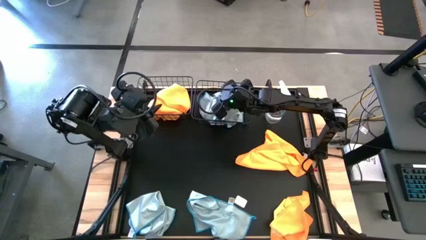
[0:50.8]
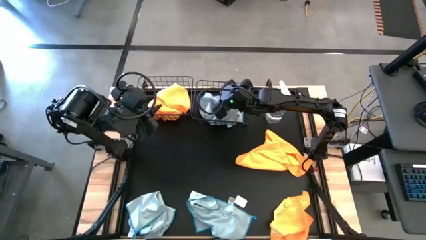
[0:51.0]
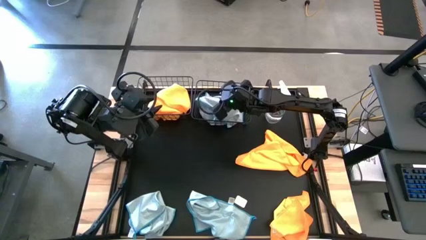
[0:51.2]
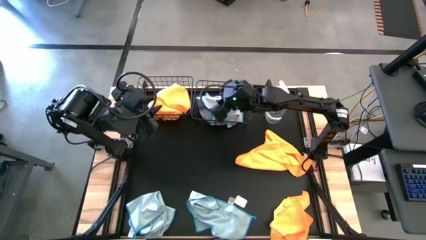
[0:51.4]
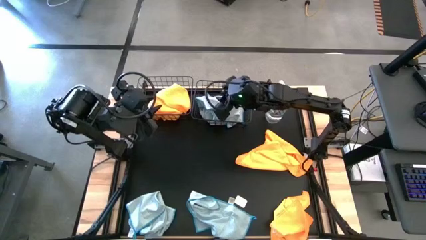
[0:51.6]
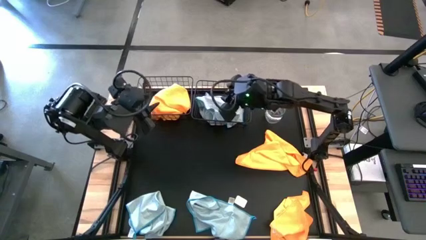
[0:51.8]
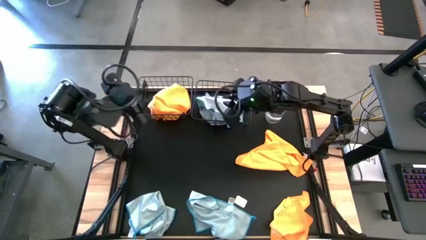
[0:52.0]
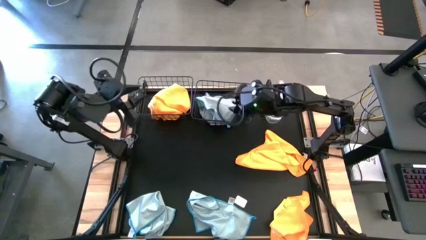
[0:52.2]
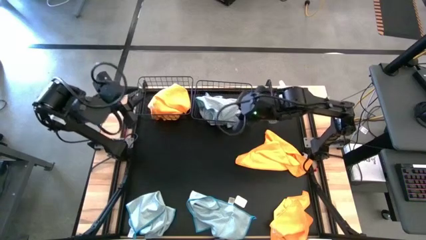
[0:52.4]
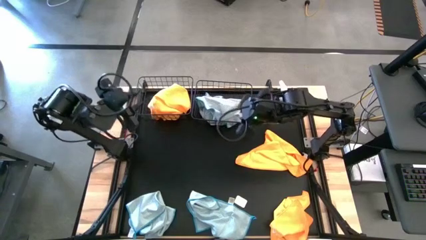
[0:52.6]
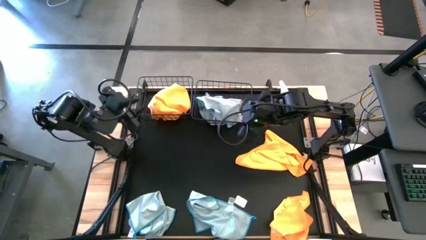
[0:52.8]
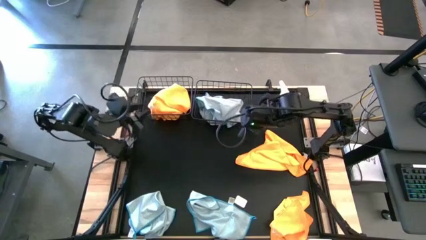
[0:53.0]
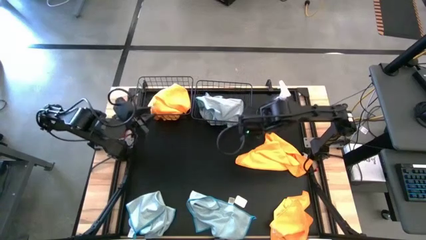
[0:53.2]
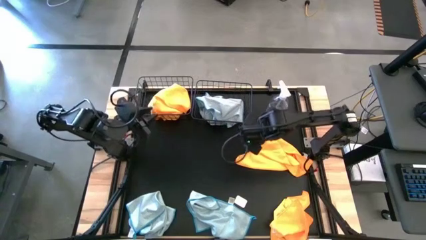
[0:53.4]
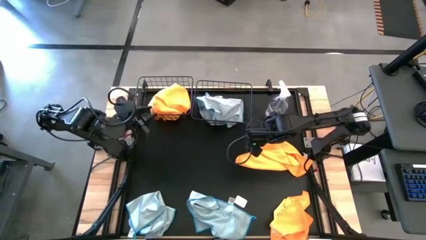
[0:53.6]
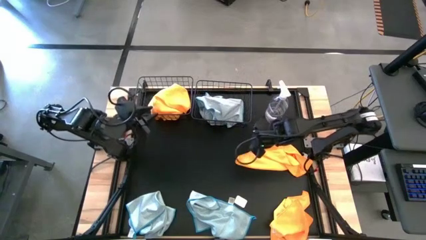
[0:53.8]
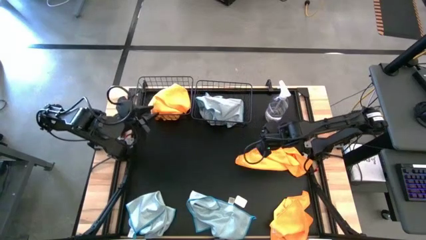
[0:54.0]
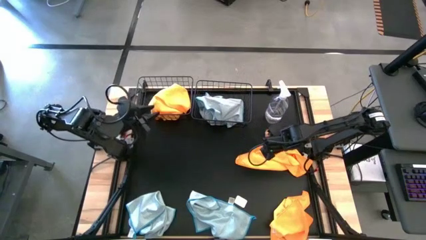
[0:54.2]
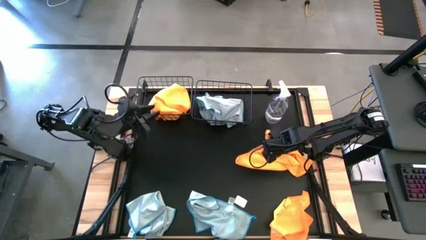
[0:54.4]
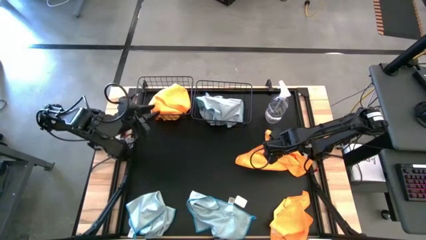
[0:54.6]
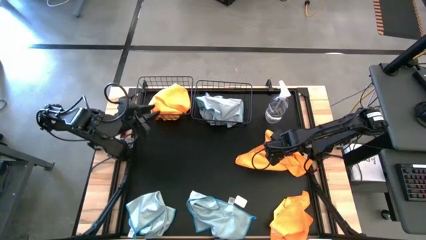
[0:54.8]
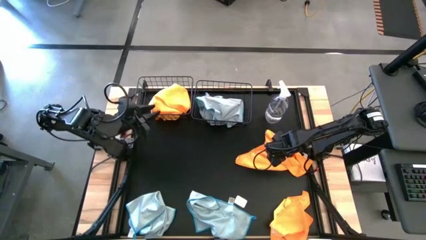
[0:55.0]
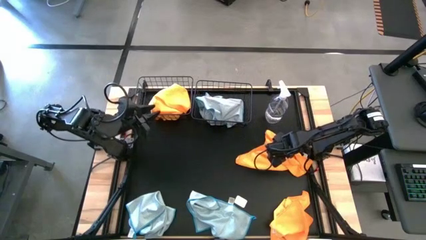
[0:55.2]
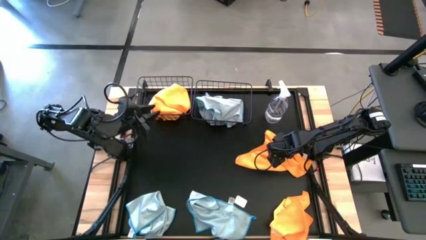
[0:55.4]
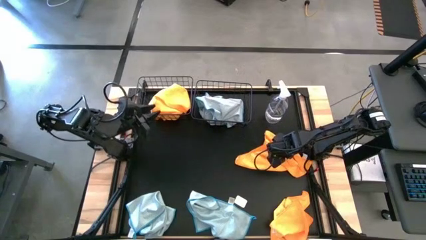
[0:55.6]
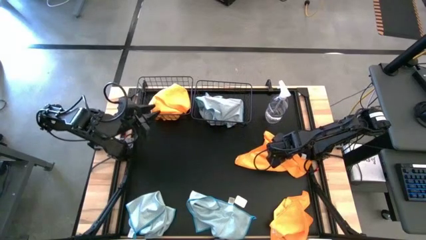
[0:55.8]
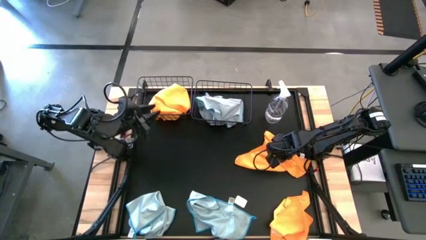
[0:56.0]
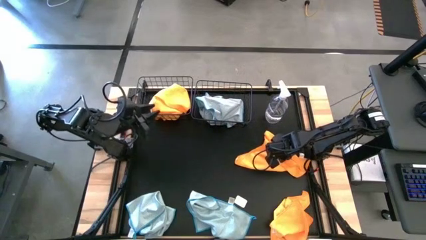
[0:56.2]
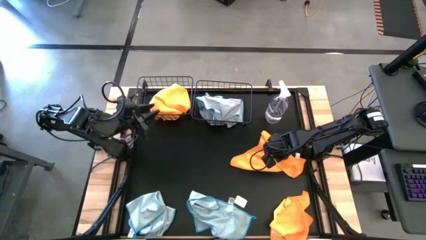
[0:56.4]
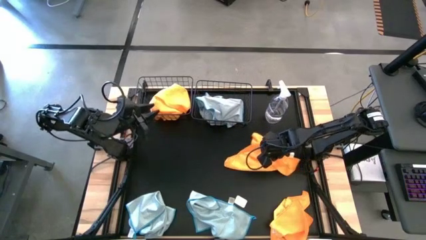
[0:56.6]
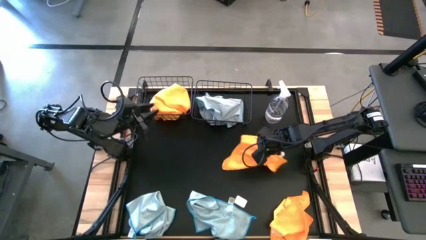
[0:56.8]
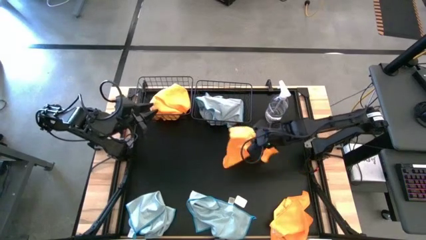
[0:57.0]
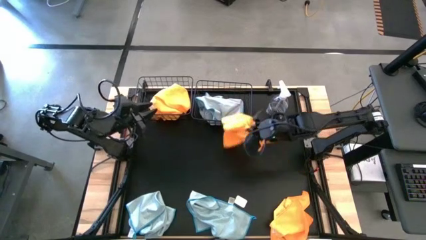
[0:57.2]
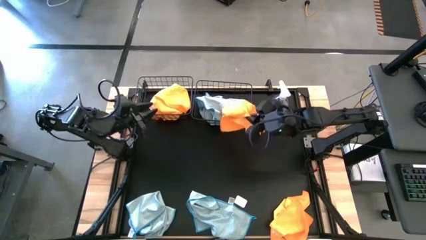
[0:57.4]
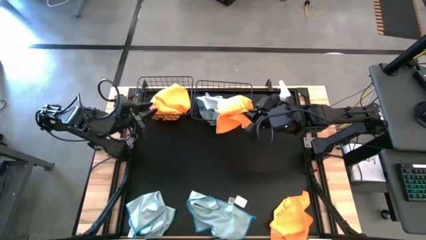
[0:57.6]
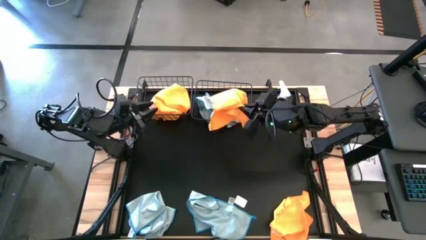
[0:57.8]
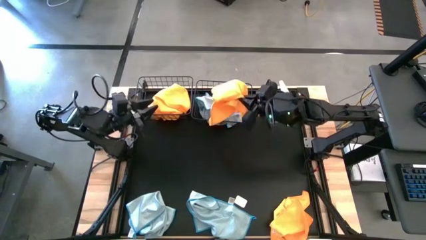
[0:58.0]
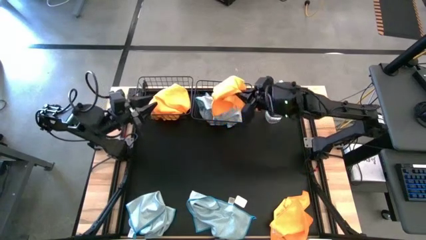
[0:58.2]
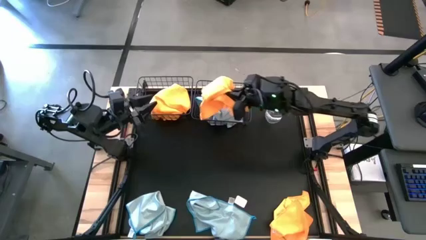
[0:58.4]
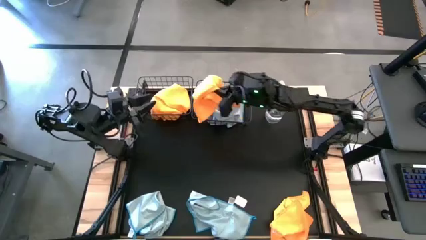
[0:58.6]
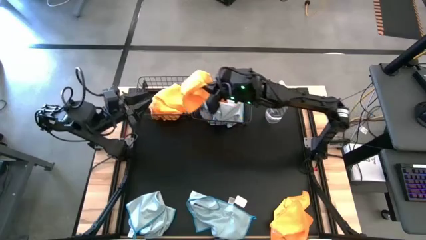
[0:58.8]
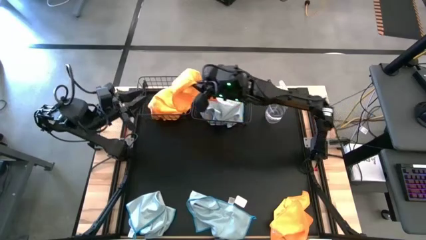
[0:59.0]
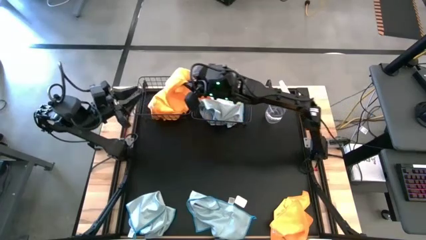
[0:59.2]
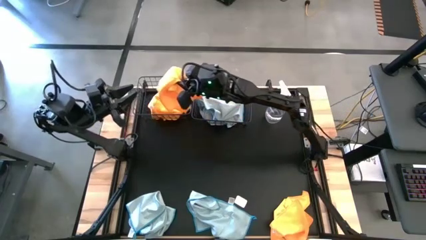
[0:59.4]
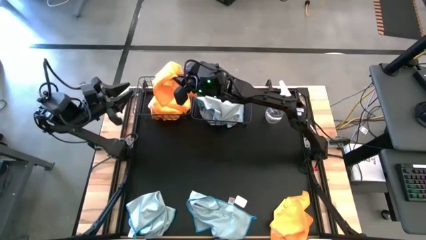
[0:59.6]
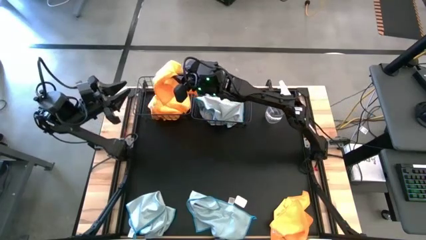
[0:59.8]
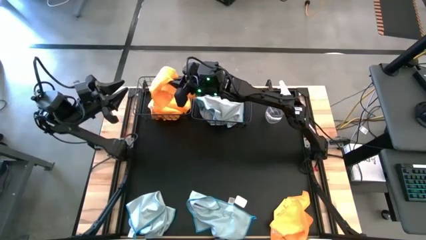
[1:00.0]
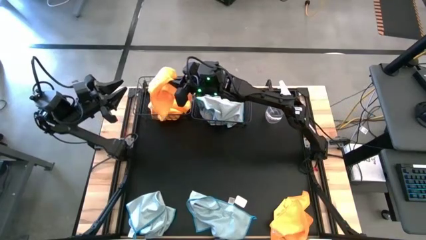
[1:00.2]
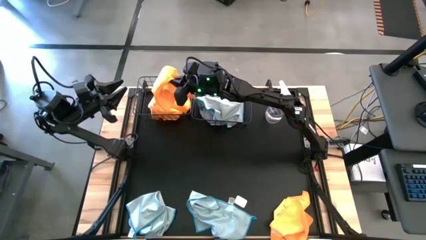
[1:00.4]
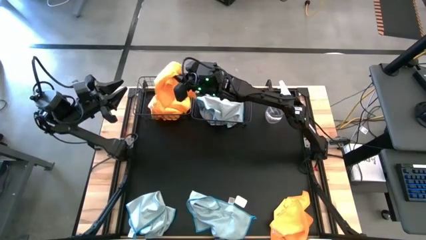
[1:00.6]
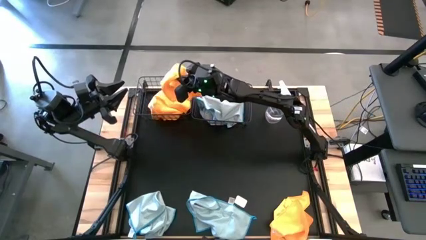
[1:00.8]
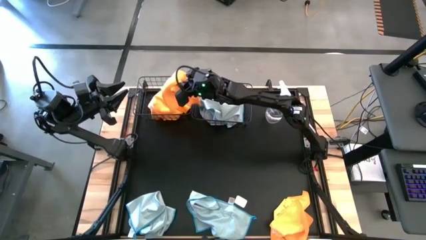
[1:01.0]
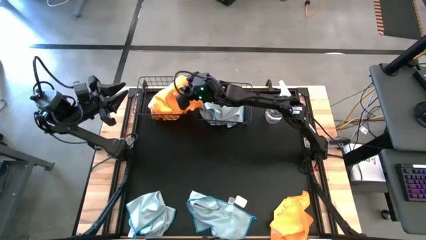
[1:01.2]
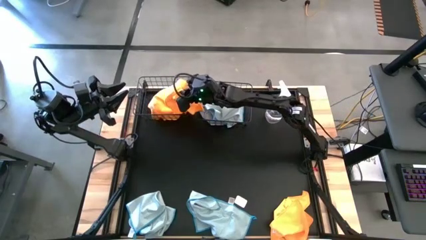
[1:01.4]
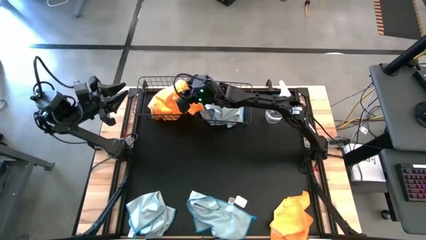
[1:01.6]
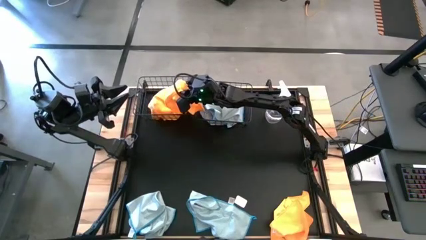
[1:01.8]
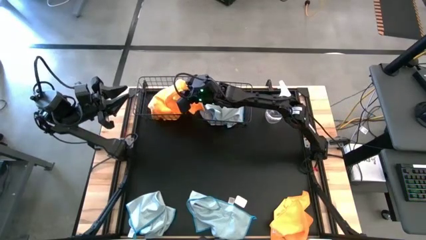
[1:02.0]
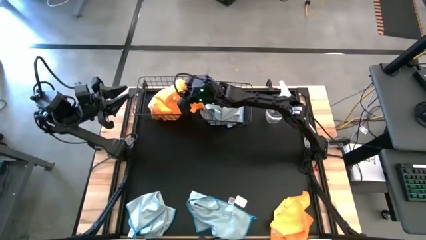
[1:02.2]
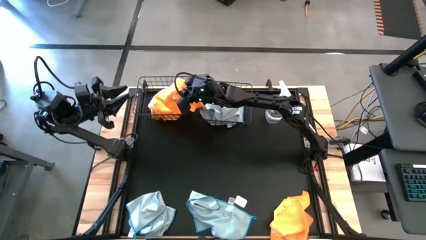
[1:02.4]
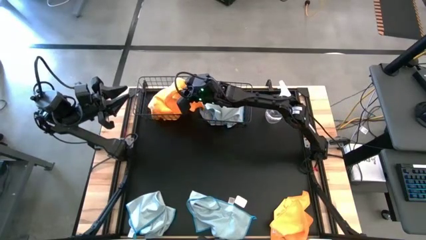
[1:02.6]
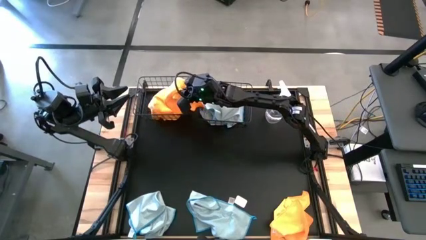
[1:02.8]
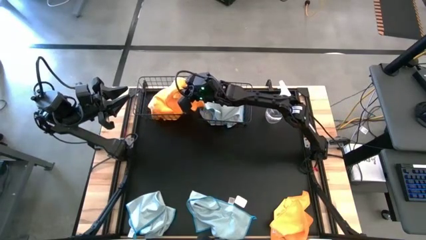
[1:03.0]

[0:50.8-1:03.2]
Task: Sort microfiber towel by color & place in baskets
Put the yellow microfiber cloth into the left black wire basket
